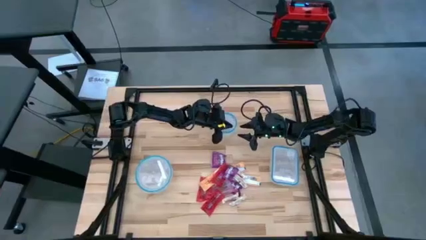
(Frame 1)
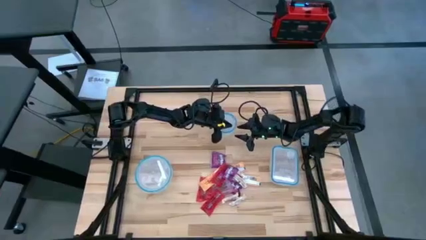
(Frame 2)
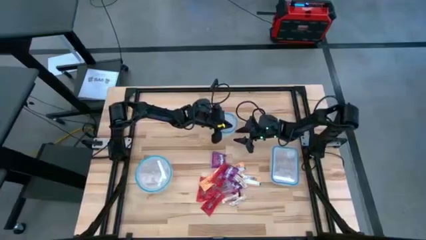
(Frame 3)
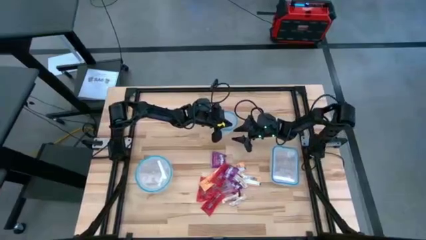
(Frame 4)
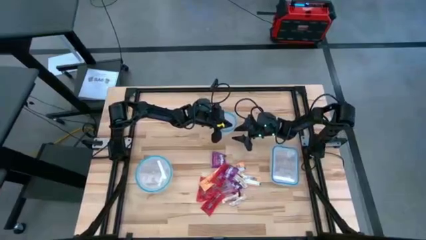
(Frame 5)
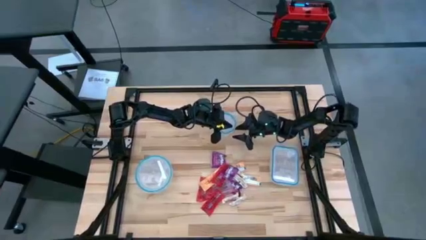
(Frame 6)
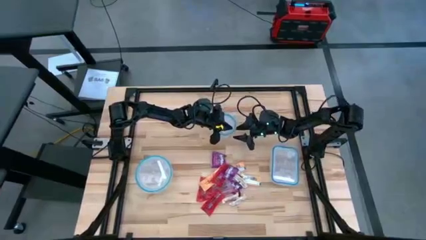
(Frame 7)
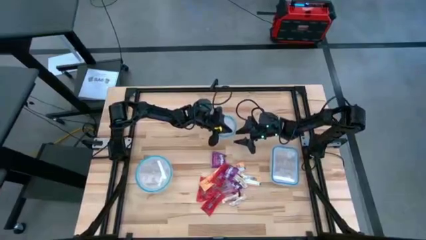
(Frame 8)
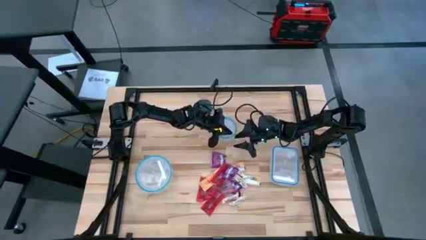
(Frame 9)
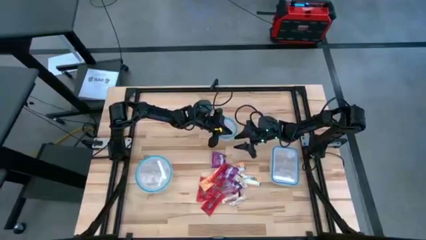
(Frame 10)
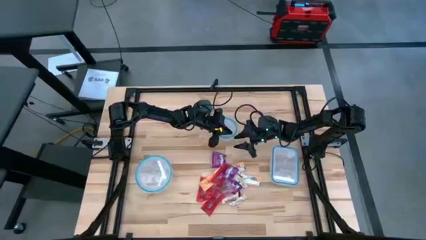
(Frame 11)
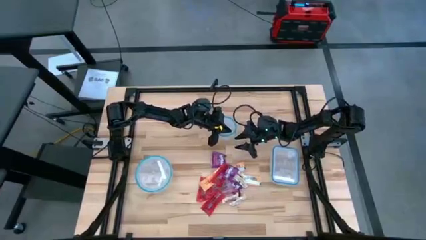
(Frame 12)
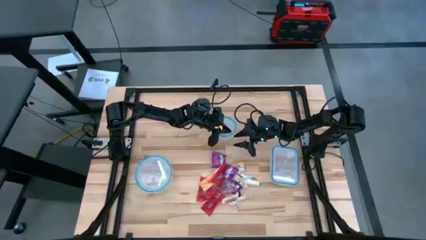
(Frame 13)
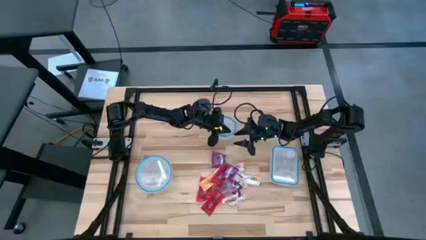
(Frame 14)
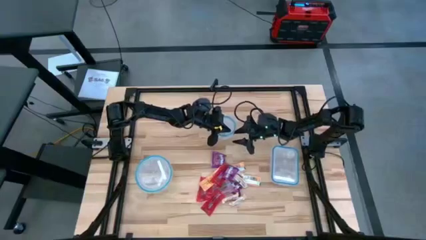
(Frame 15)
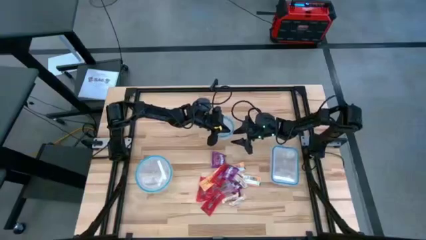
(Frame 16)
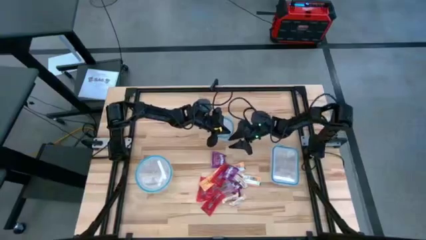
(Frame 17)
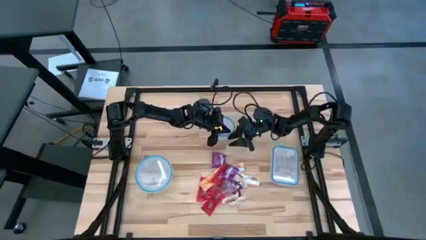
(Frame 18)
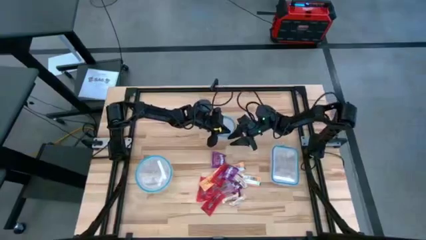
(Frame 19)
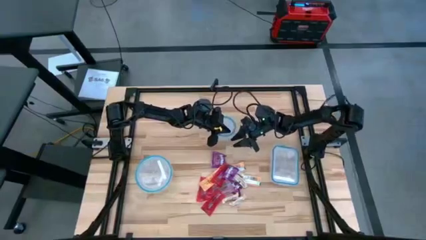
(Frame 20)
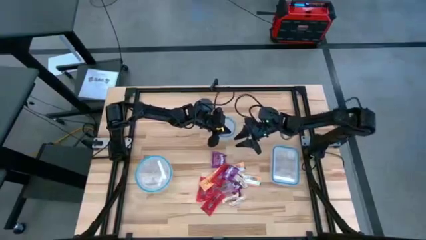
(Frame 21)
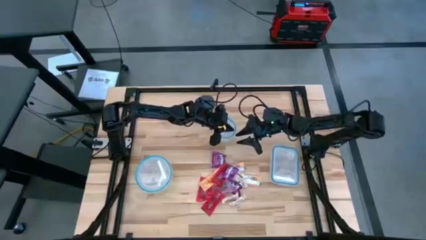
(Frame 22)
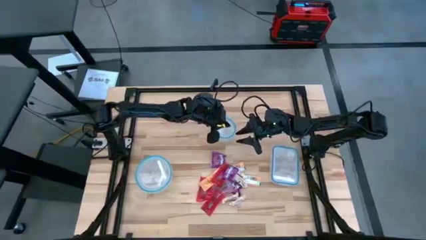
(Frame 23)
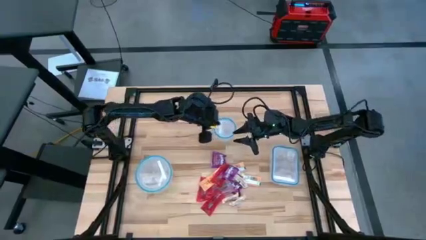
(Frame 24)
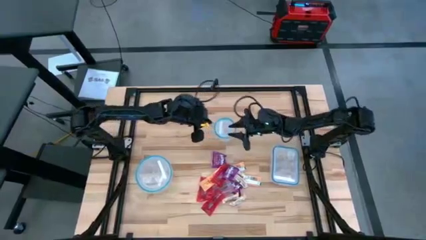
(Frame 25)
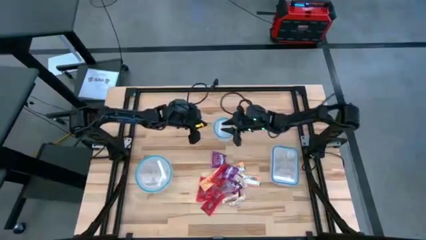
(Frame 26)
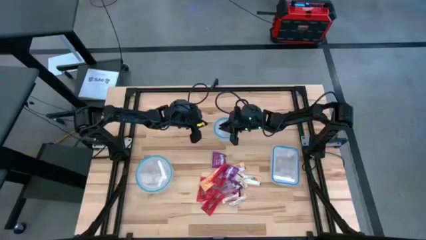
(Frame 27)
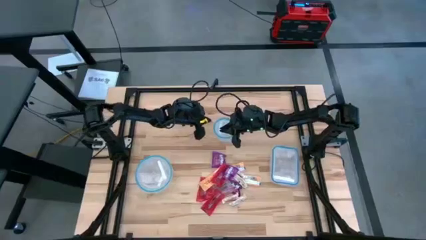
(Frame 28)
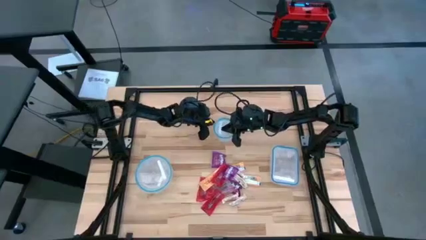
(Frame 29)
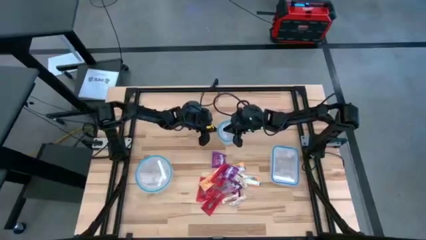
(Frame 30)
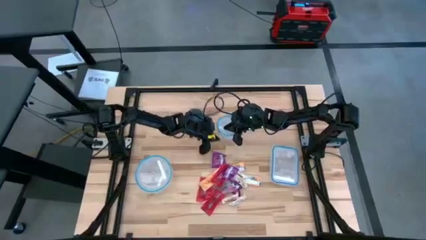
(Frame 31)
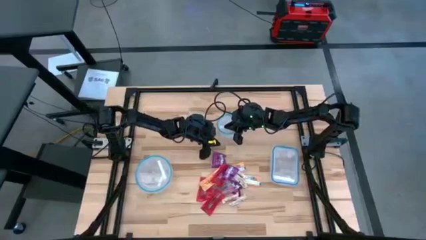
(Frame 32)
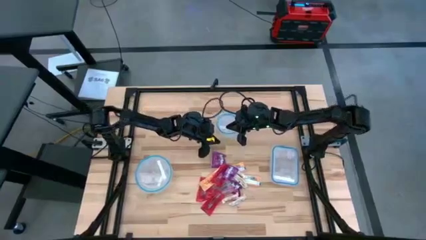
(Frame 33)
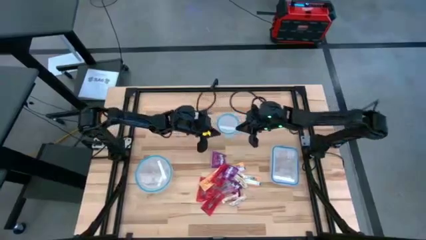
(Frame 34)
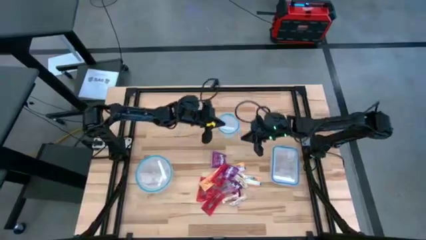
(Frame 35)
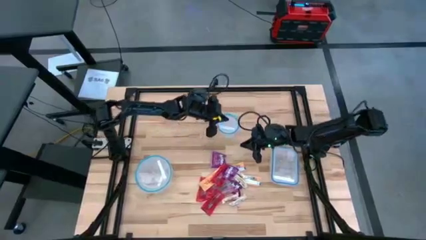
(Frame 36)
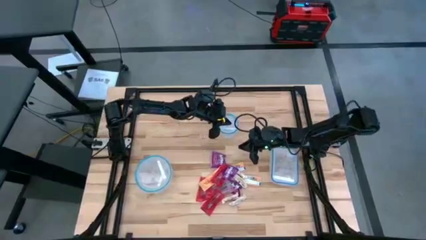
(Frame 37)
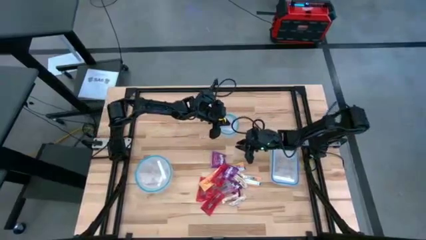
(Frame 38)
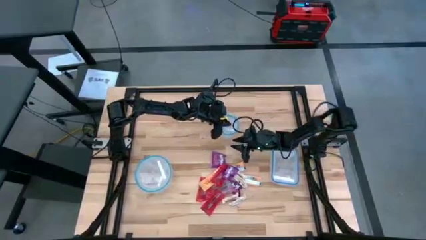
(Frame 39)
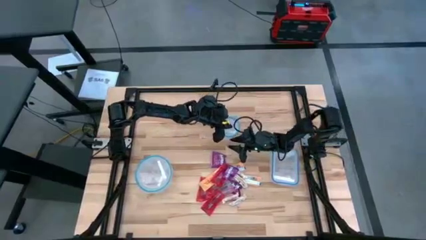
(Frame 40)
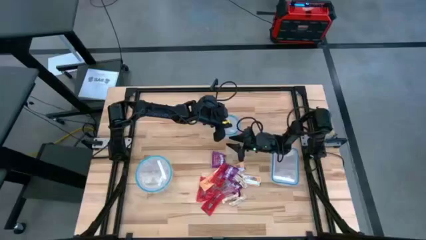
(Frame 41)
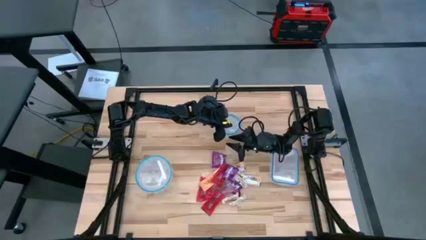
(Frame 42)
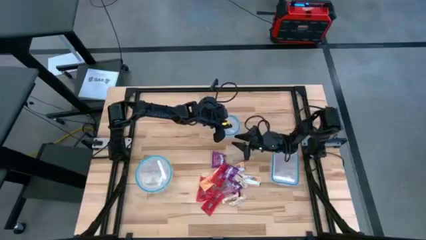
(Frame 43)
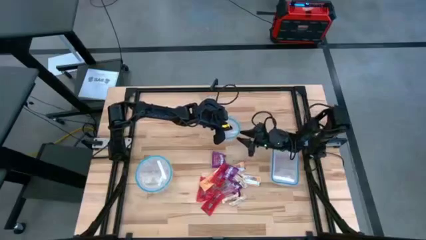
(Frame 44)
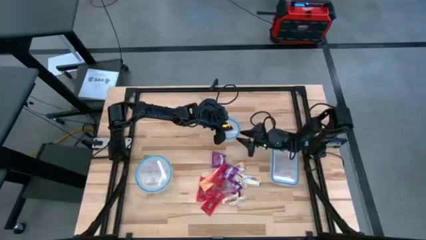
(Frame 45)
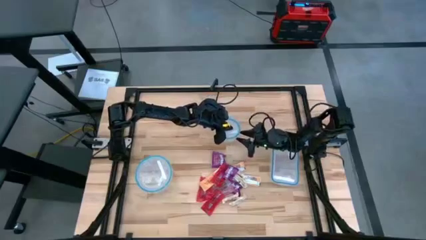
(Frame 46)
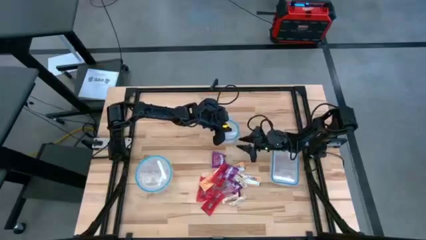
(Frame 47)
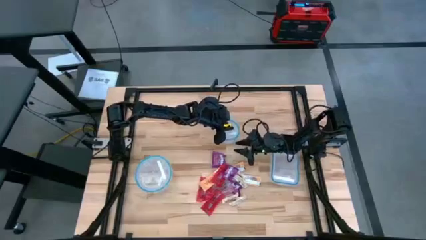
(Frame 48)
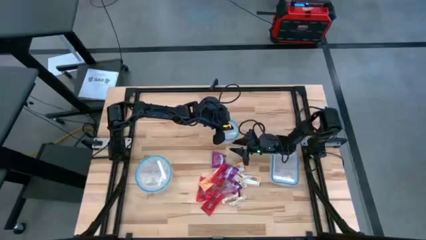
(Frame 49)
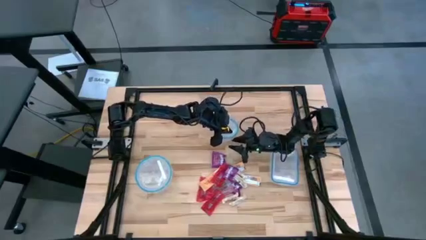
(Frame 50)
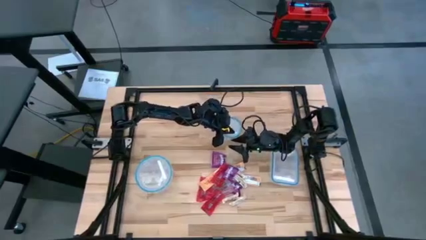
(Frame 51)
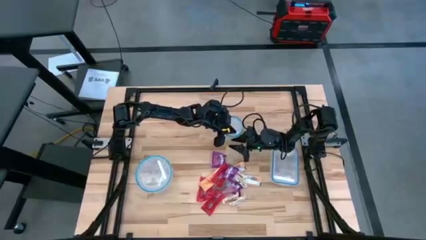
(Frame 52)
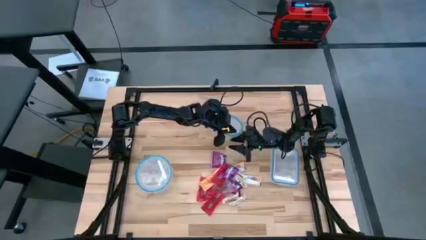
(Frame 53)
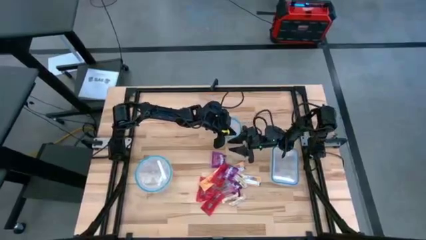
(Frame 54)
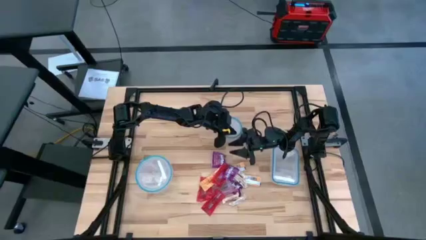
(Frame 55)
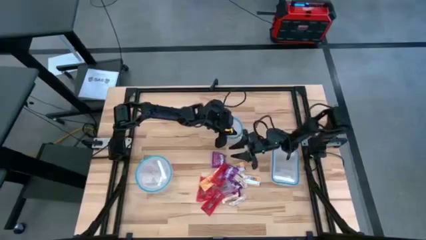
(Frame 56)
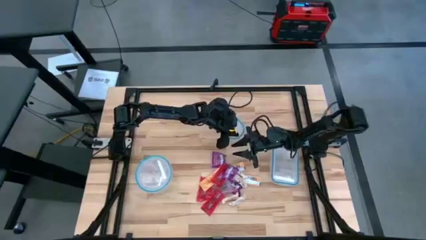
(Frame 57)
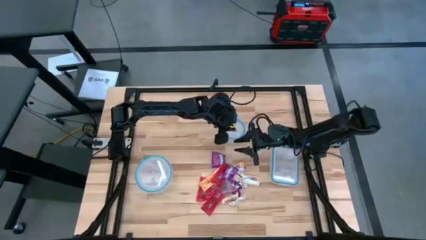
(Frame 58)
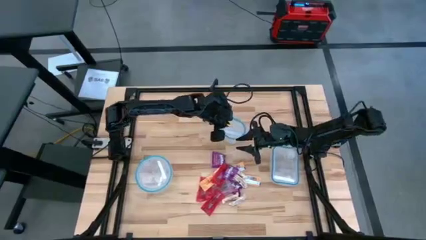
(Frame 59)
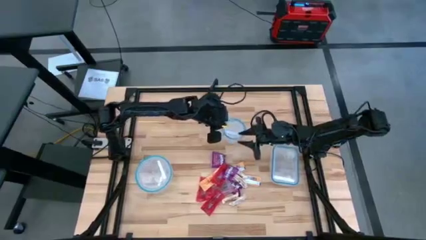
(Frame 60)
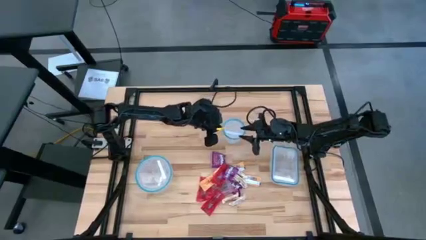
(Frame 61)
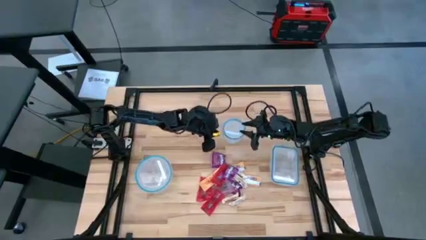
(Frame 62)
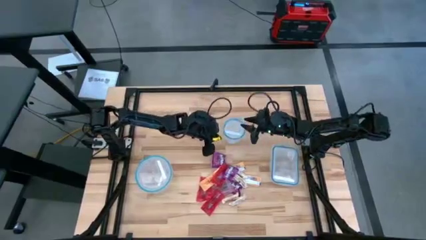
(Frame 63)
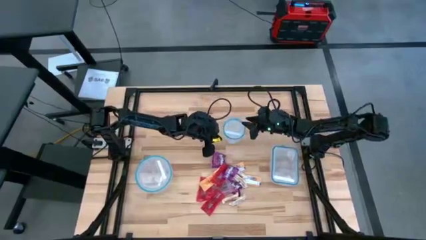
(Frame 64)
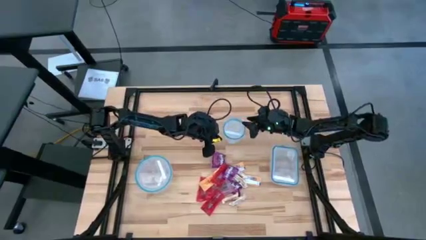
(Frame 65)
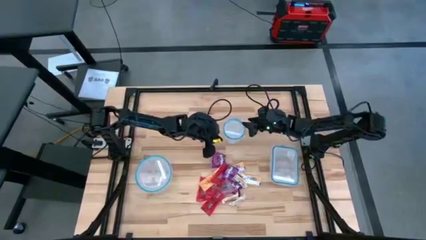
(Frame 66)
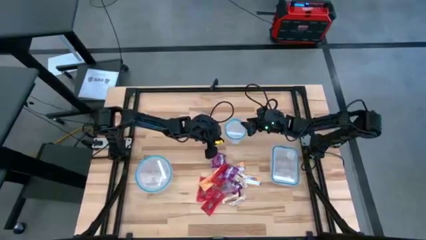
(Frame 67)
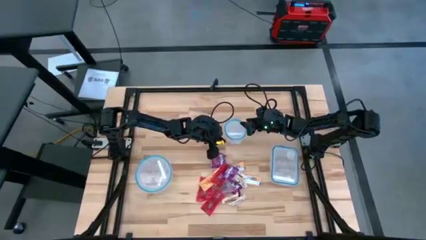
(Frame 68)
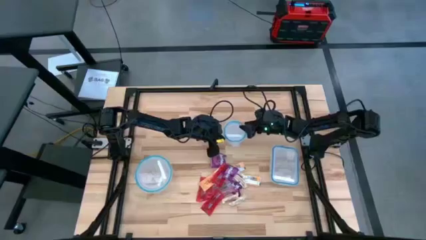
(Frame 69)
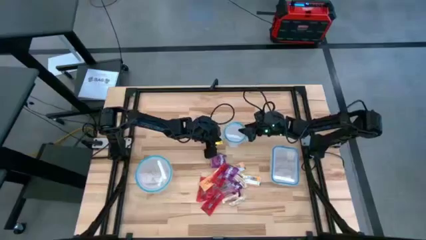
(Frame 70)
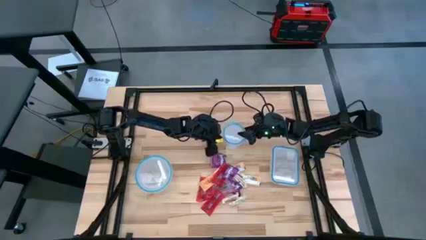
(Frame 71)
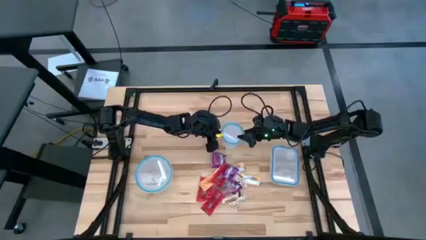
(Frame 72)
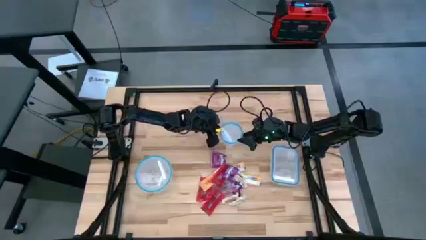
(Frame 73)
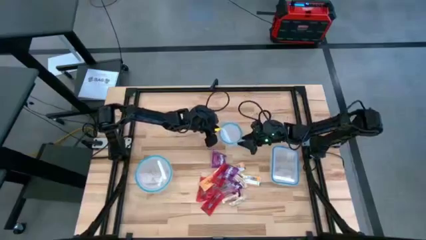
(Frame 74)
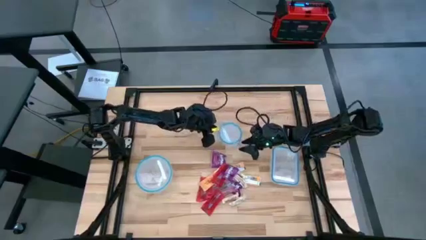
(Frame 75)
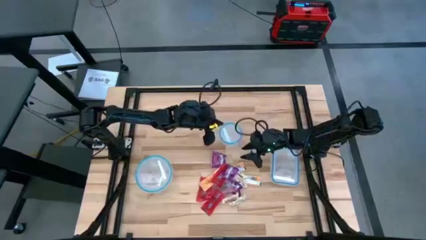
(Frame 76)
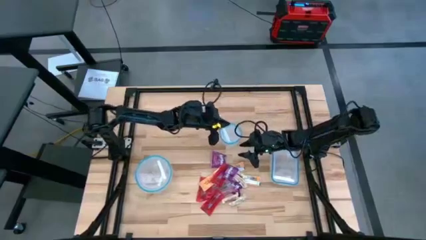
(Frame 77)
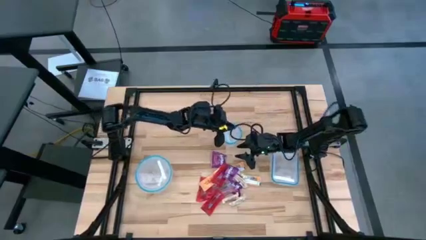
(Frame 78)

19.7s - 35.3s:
Task: Sort candy
Open the small circular transparent bin
